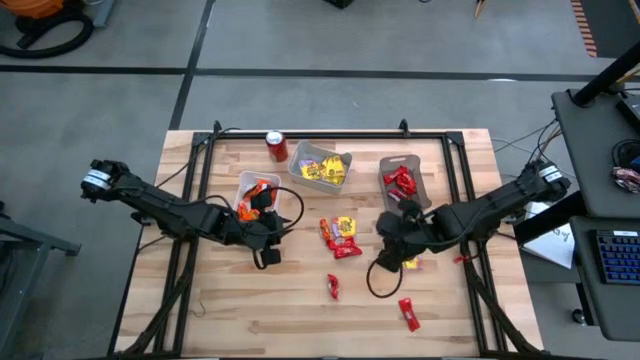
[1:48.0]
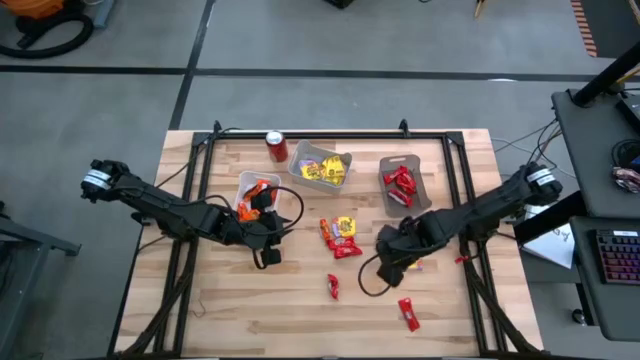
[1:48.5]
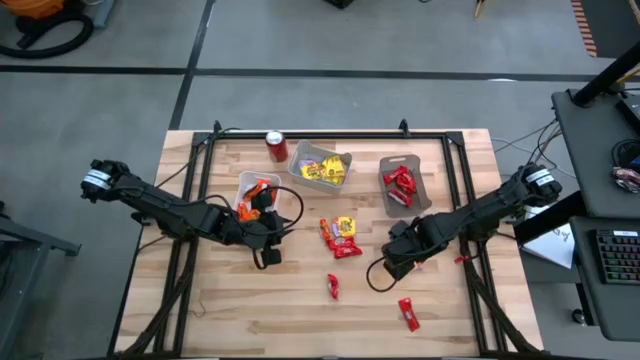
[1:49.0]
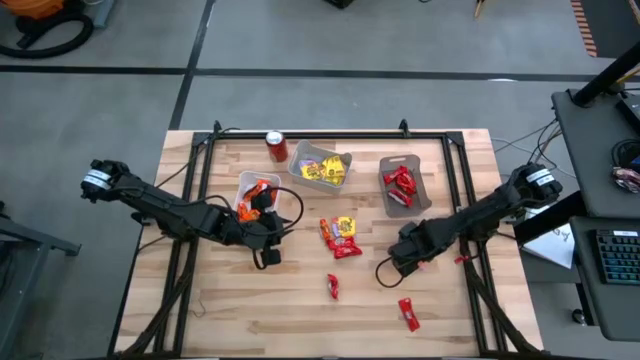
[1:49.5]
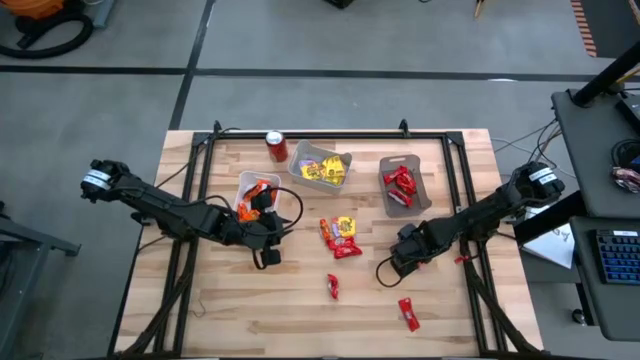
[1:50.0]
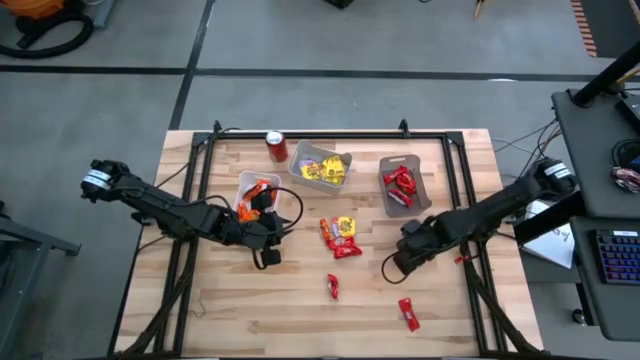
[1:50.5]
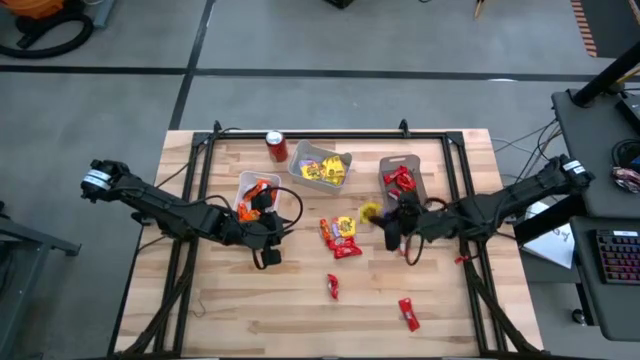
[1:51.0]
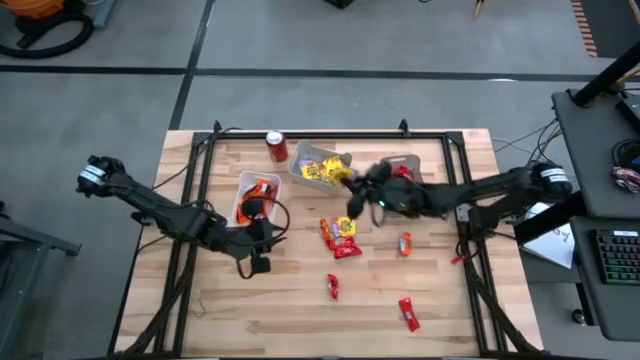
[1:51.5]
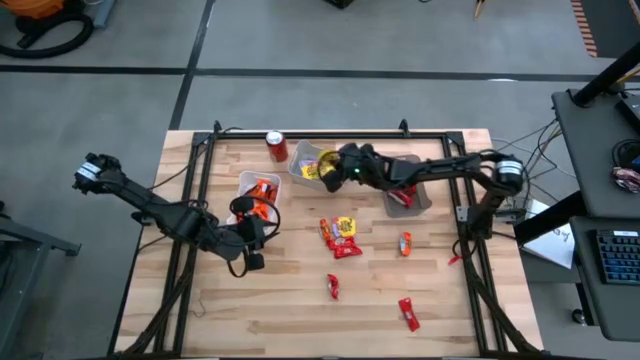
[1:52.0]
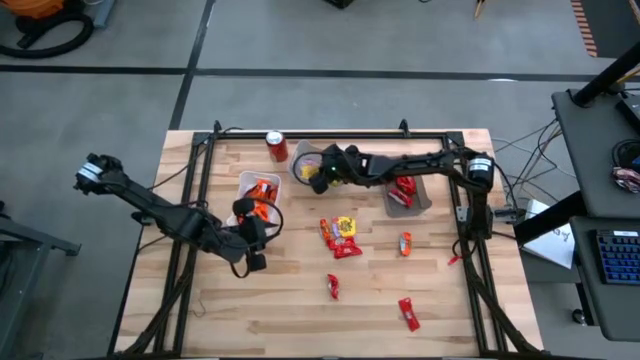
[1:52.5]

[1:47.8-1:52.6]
Task: Sort candy
Put the yellow candy into the gray bin

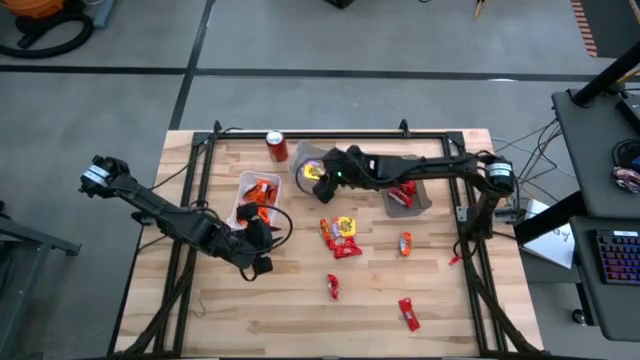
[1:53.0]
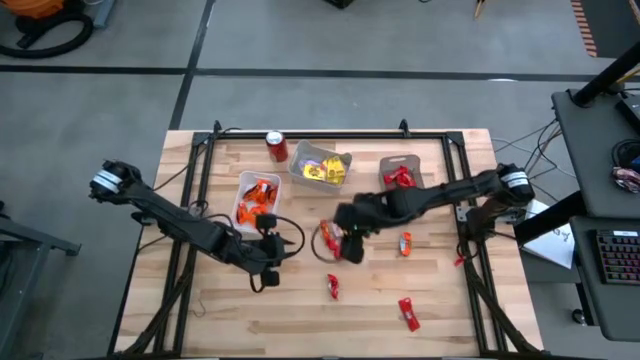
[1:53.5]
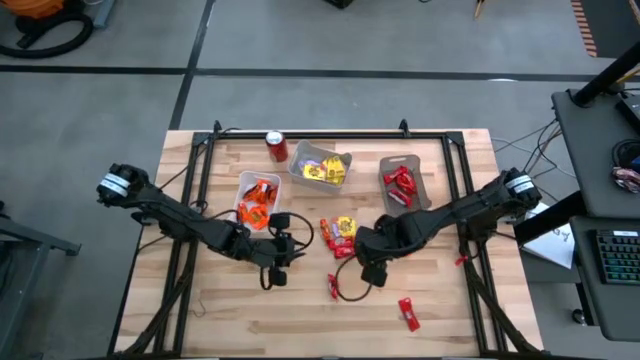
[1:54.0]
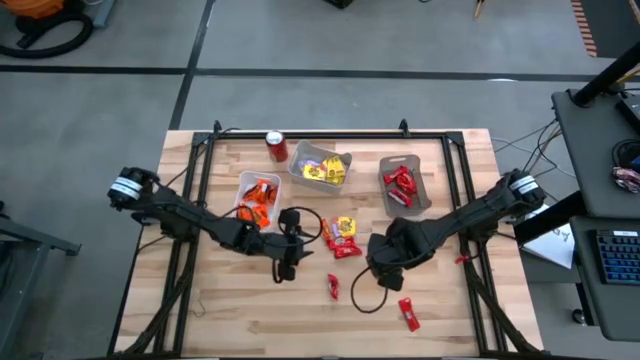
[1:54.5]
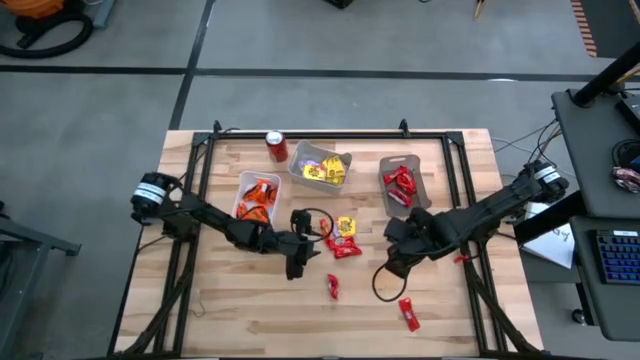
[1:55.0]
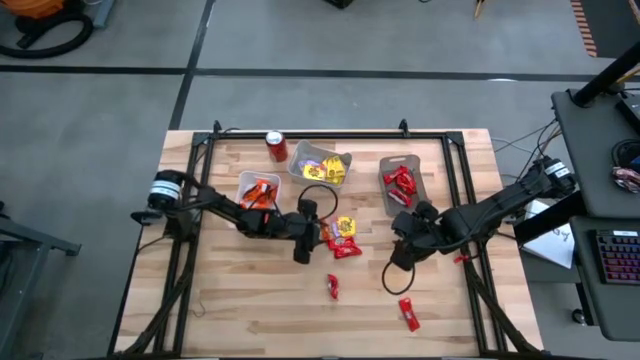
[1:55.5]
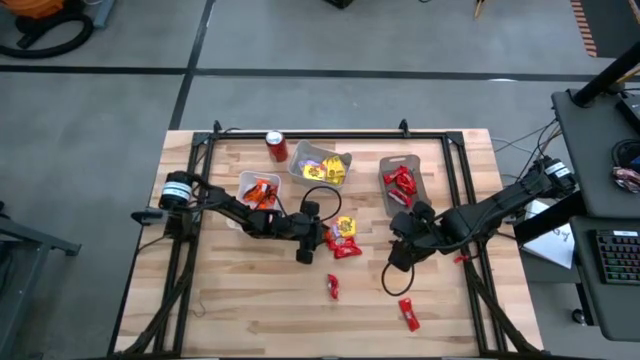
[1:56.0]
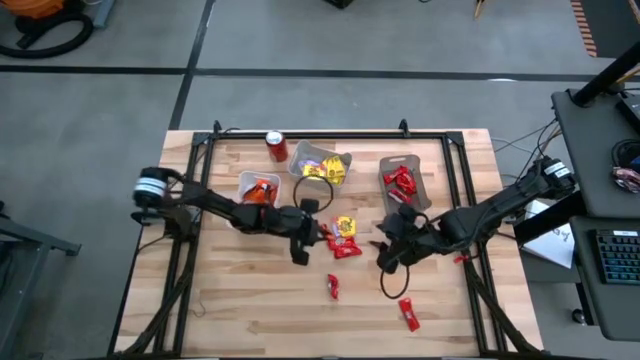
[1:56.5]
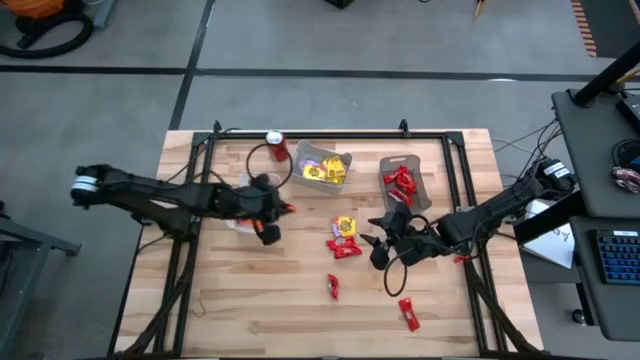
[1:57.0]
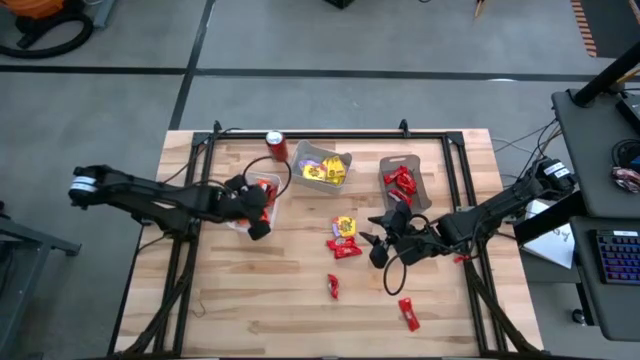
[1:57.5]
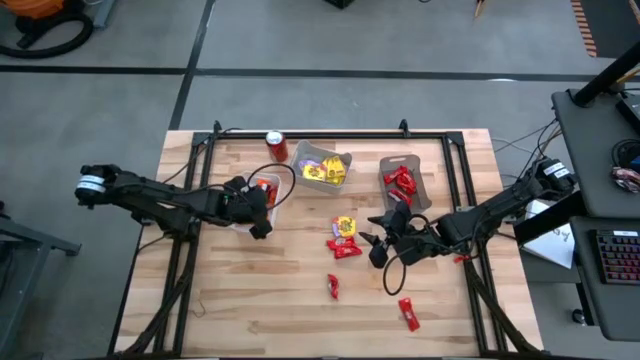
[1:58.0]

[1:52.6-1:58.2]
Put the orange chocolate into the white bin

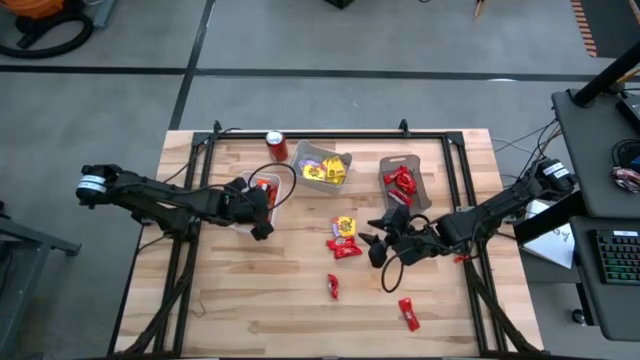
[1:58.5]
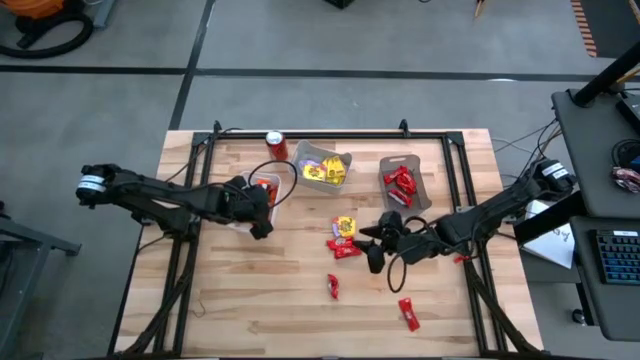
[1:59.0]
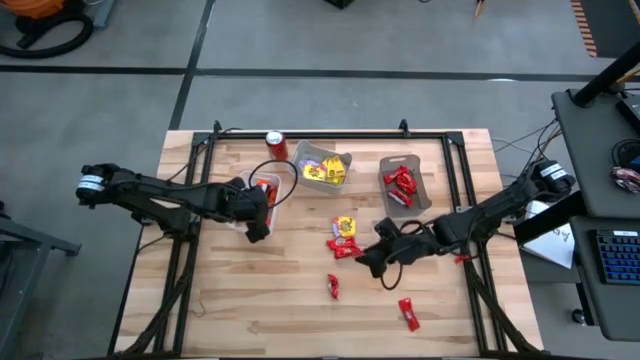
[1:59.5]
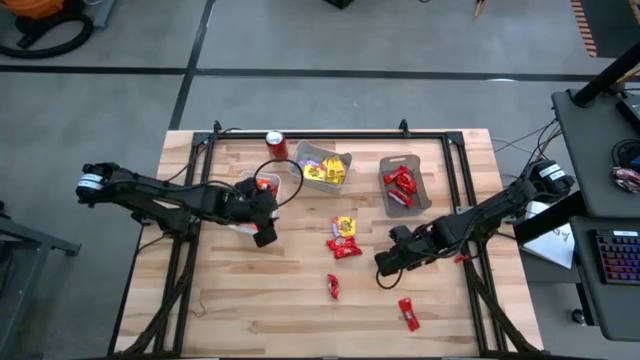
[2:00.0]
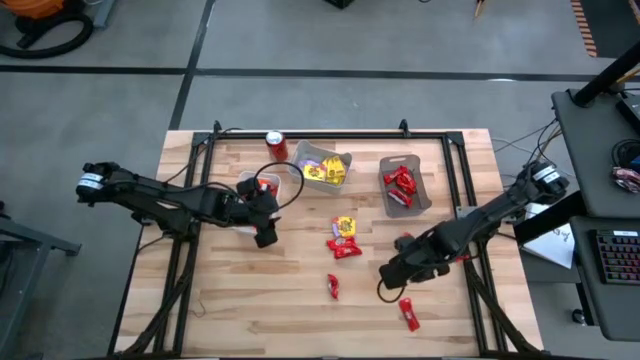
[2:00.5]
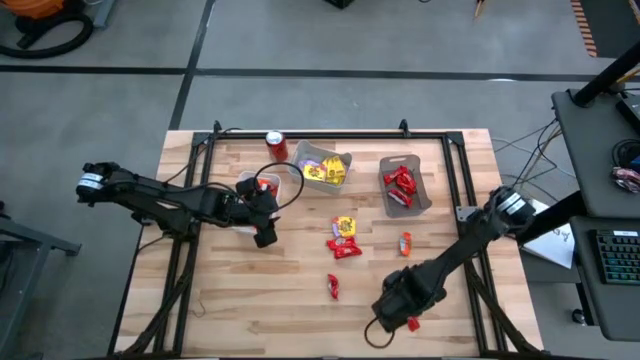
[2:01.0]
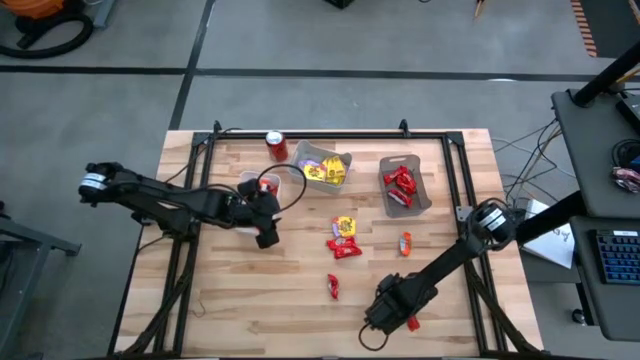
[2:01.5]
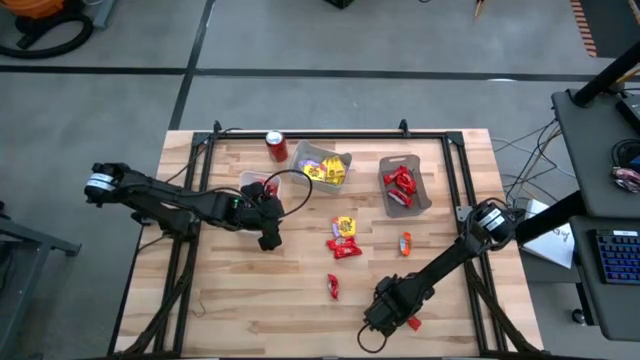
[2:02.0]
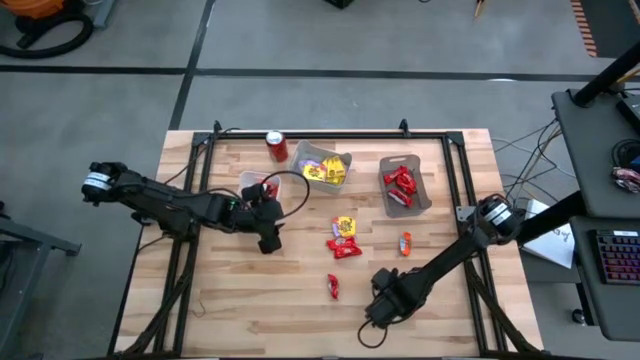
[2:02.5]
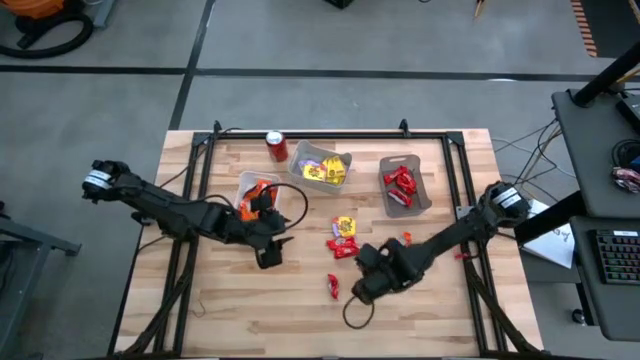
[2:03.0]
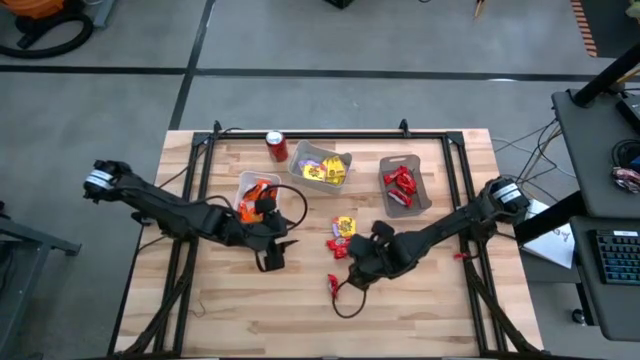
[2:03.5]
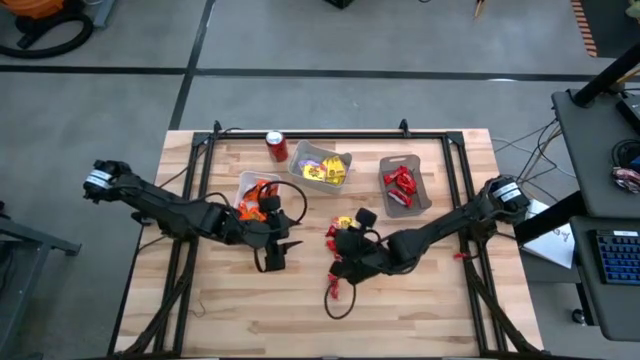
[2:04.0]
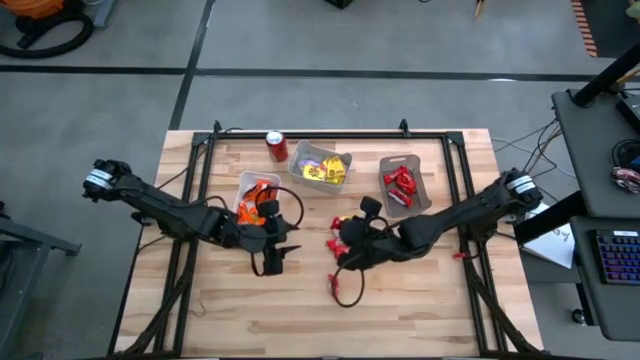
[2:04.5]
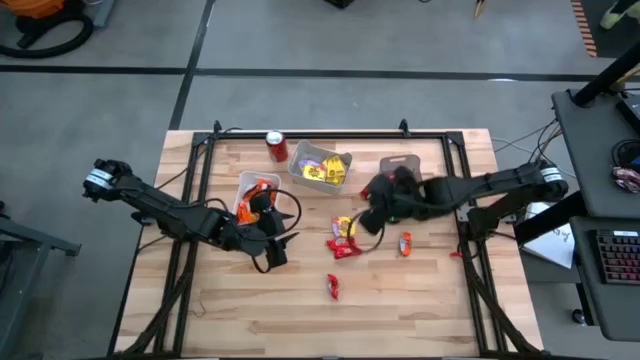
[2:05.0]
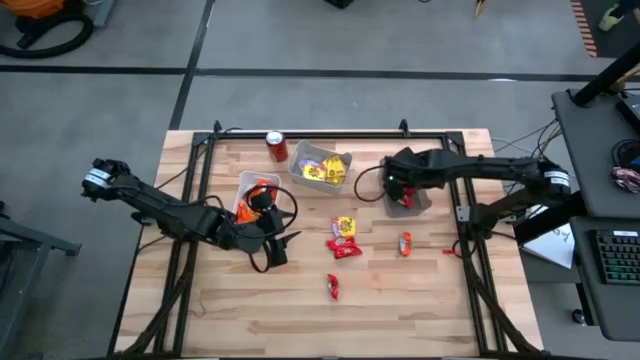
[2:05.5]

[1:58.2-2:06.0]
Put the red chocolate into the black bin

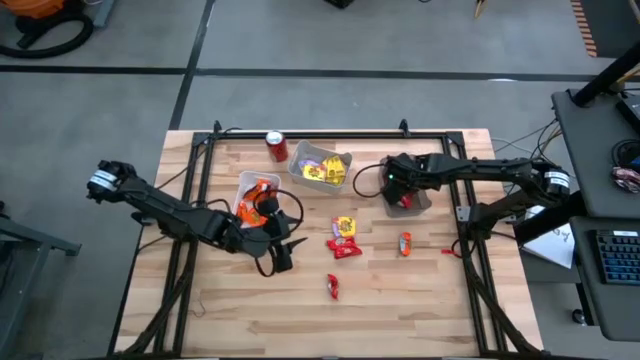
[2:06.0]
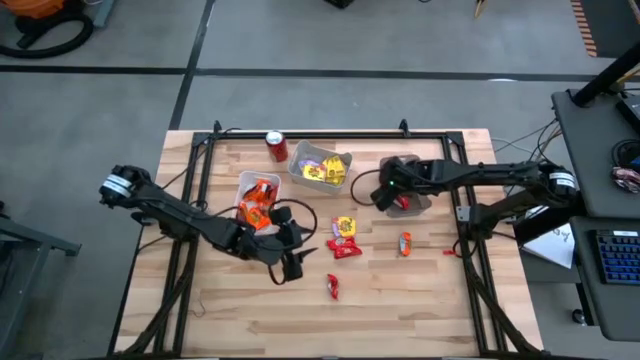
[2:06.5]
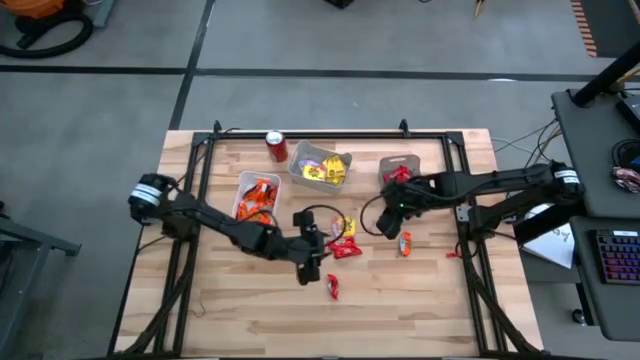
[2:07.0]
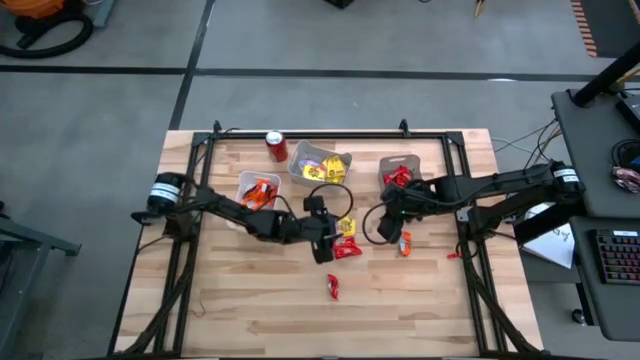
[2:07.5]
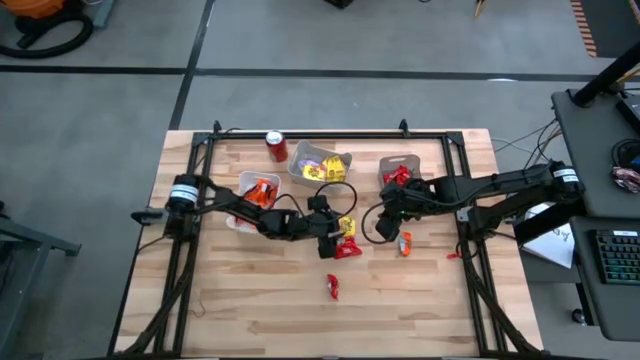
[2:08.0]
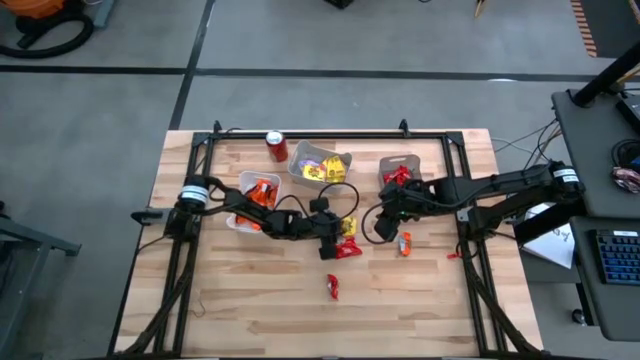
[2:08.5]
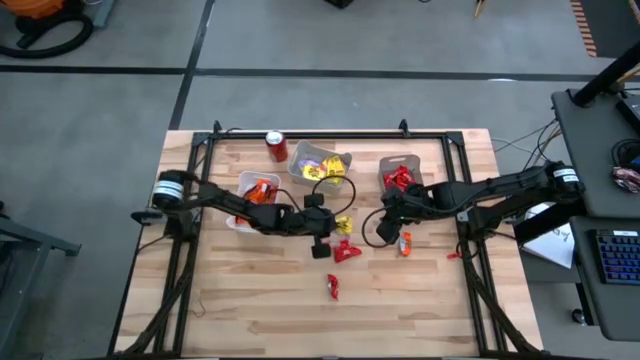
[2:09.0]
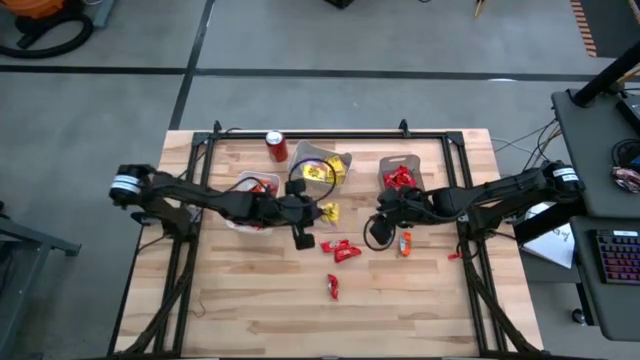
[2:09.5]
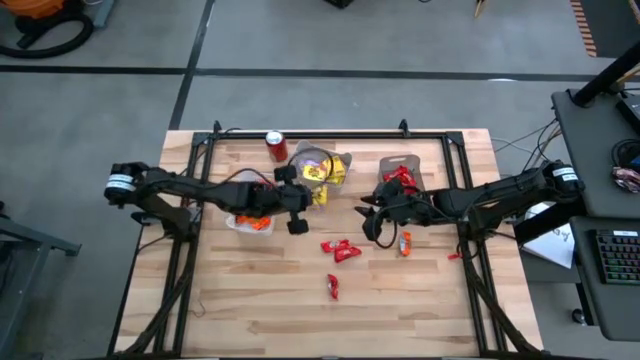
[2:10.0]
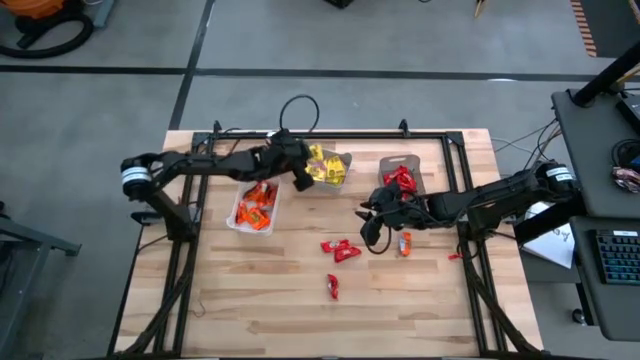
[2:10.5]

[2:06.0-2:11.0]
Put the yellow candy into the gray bin
